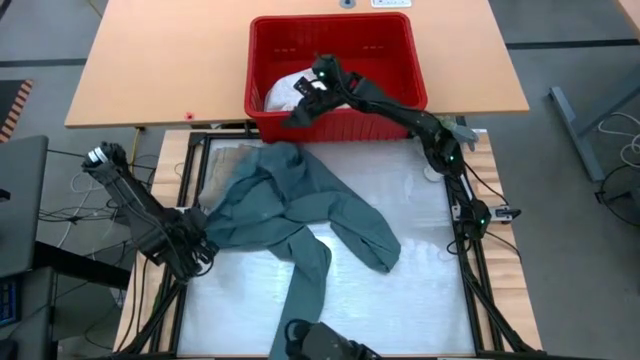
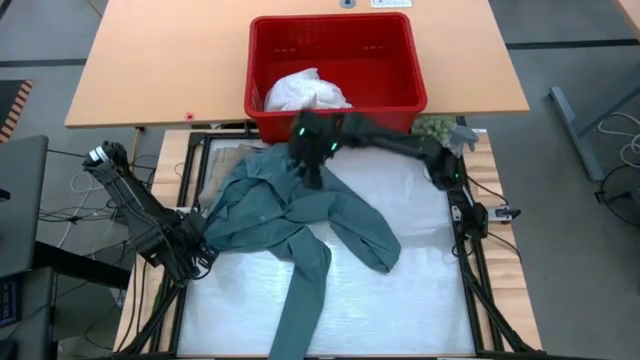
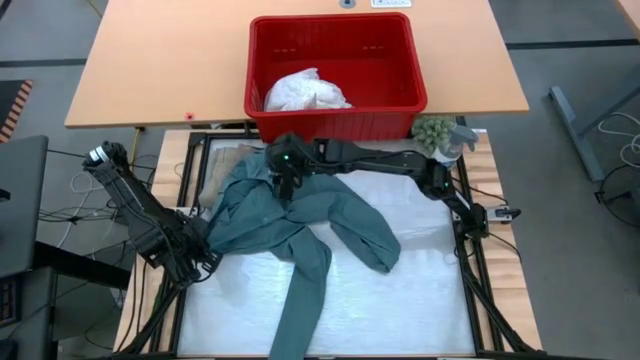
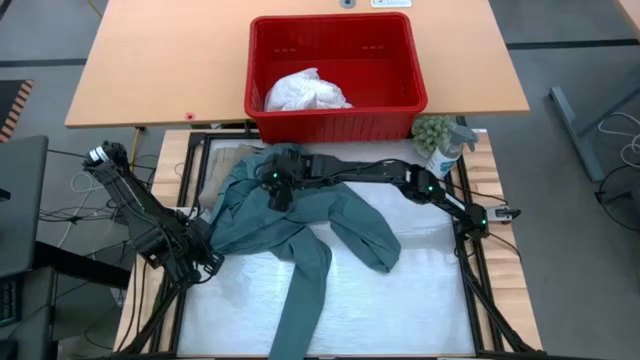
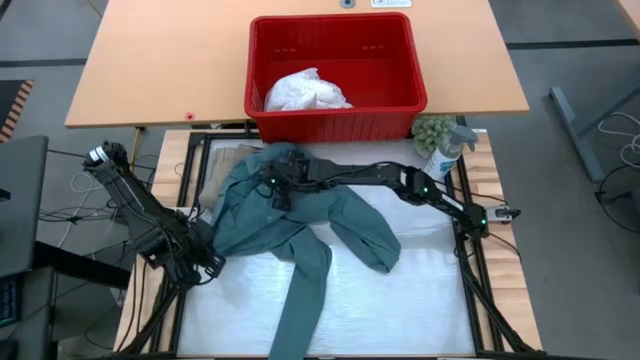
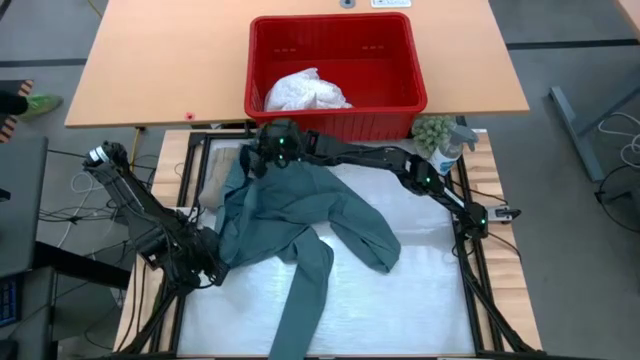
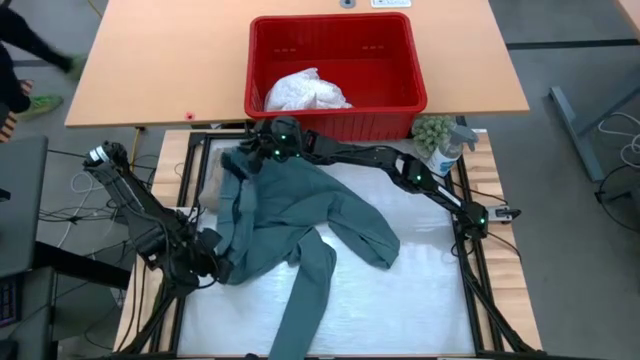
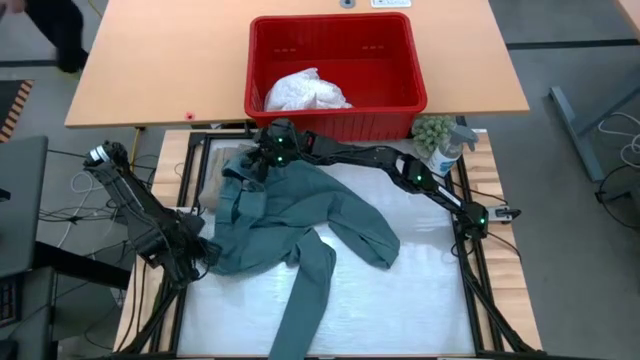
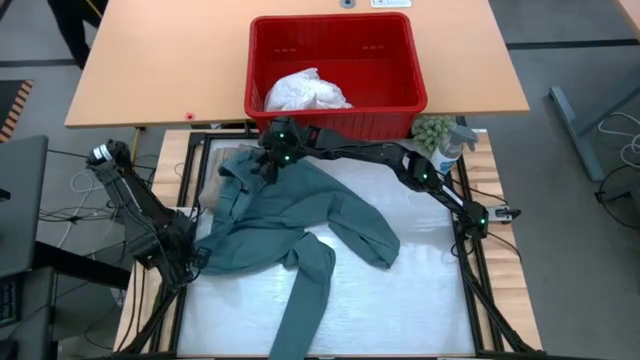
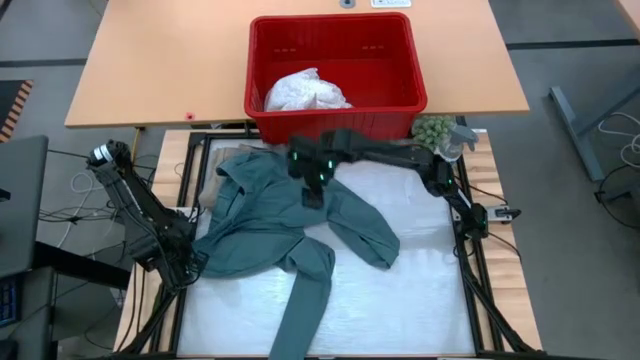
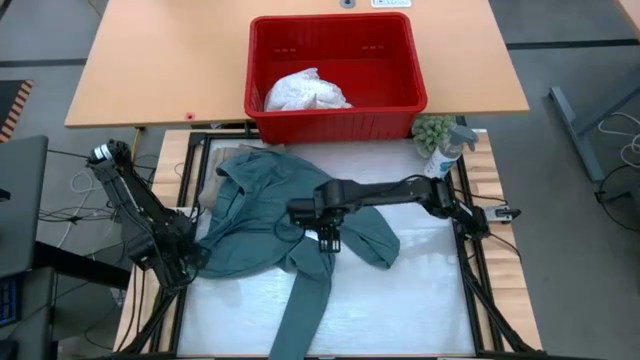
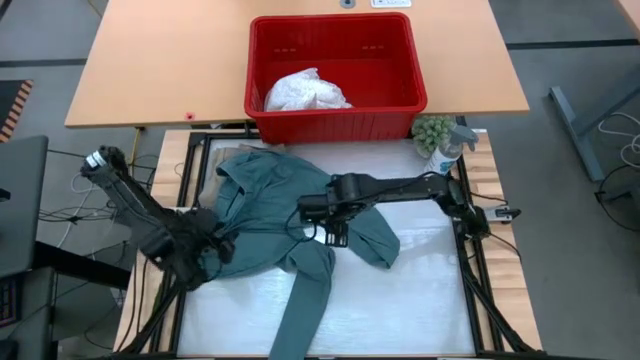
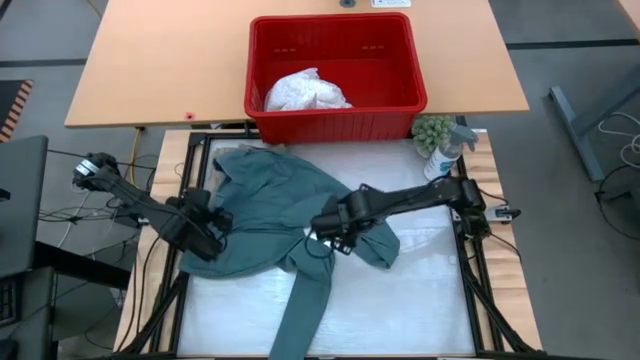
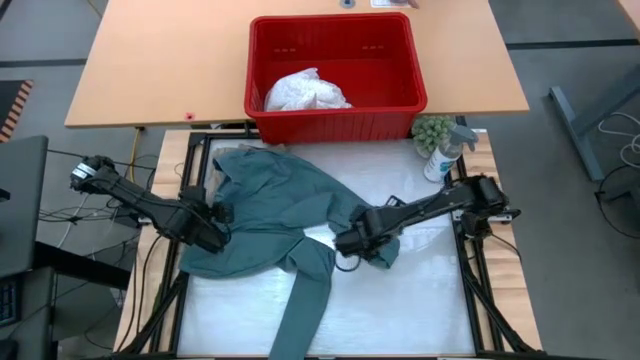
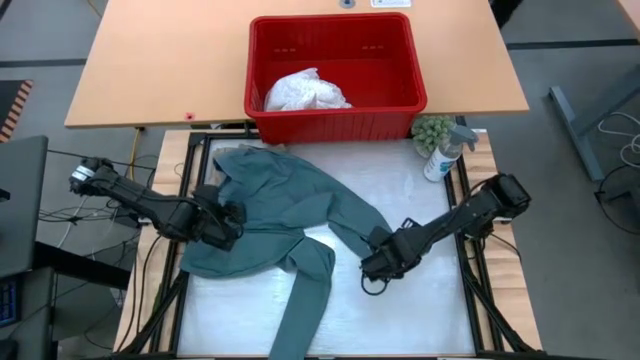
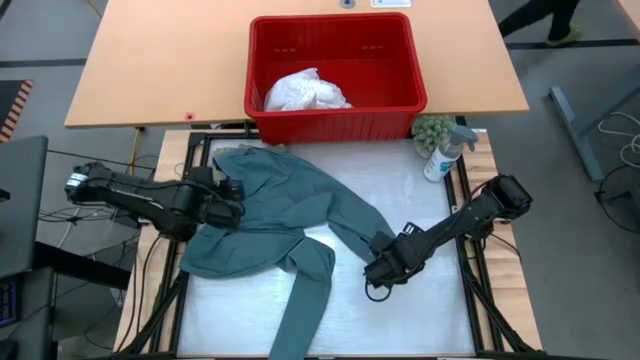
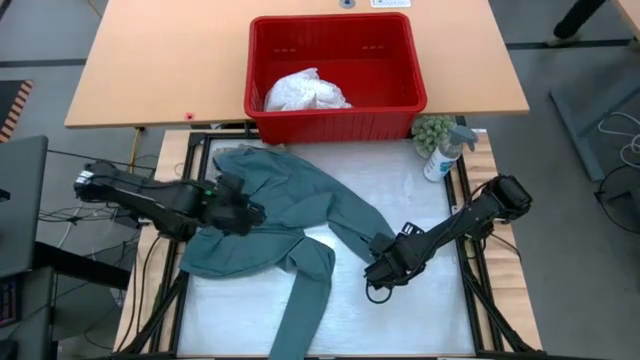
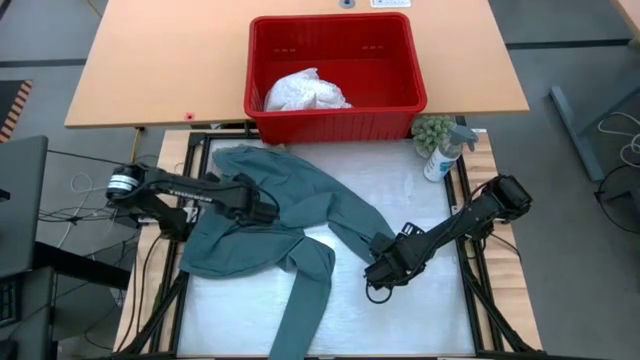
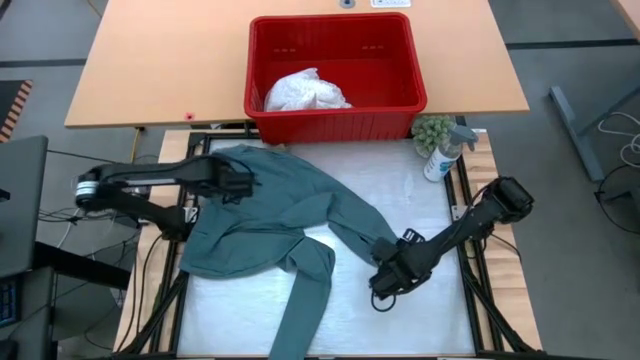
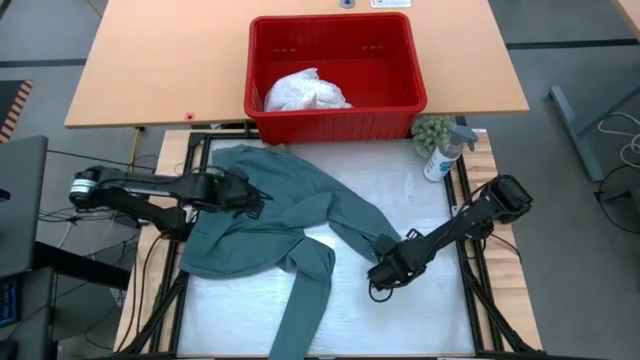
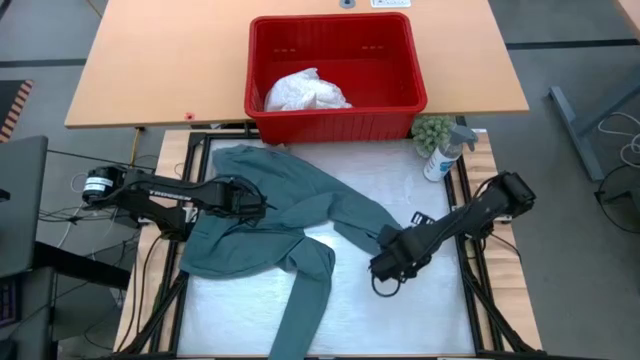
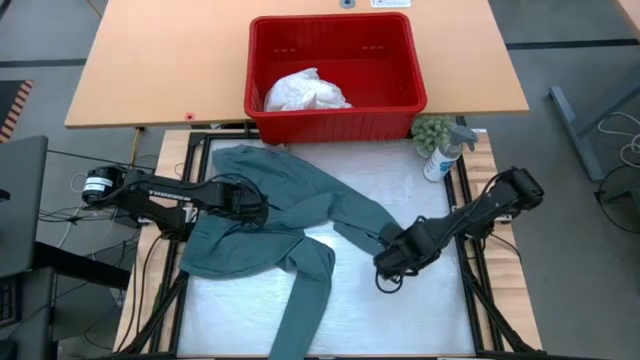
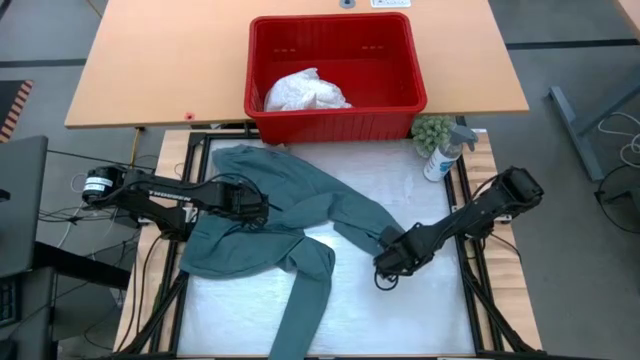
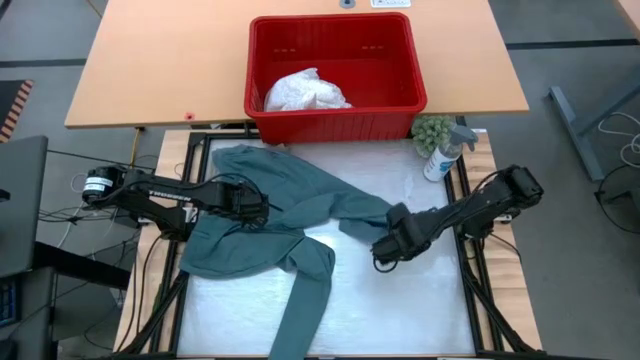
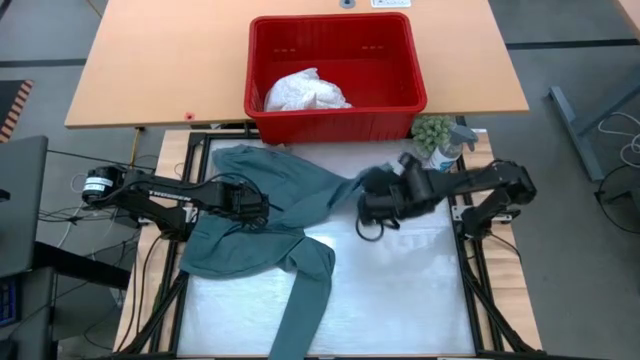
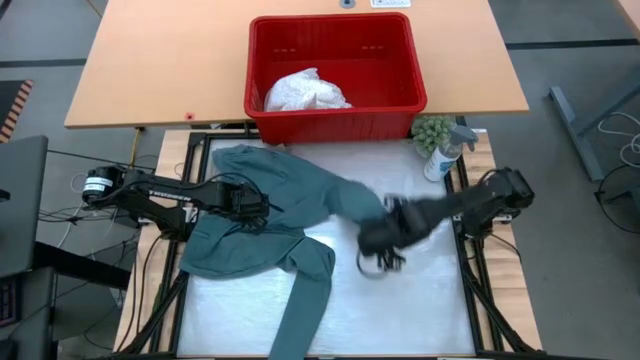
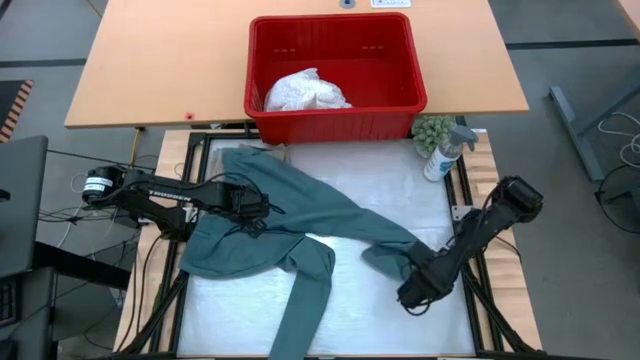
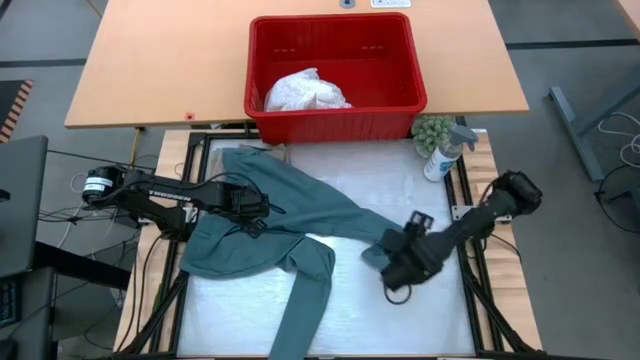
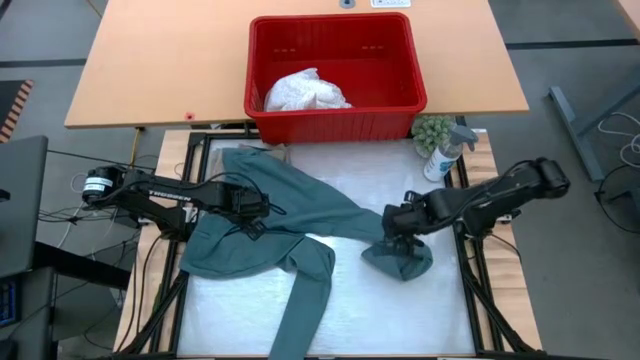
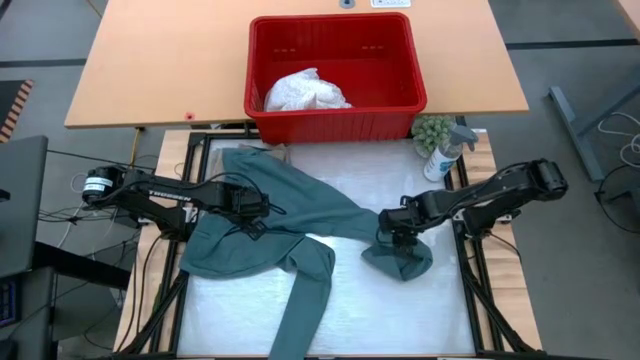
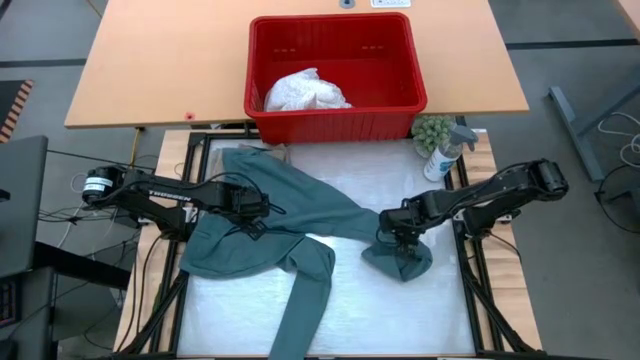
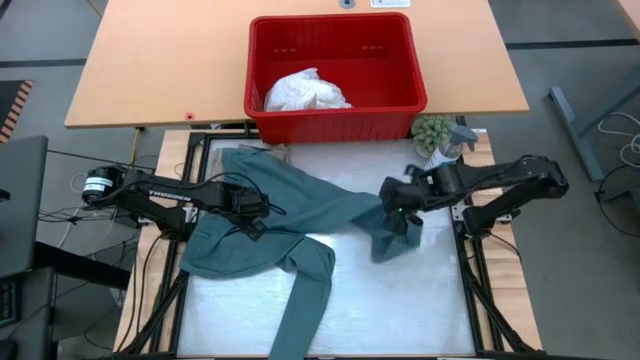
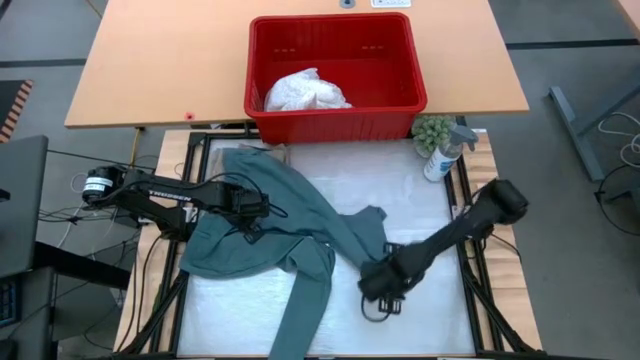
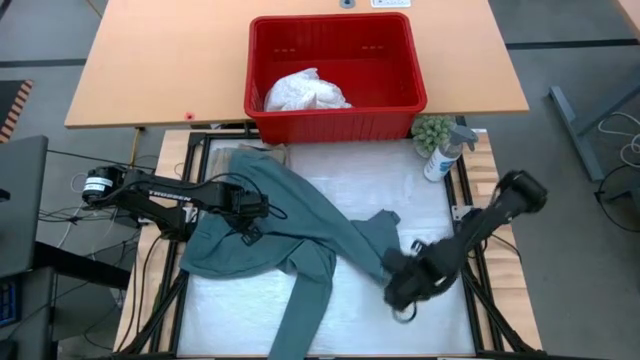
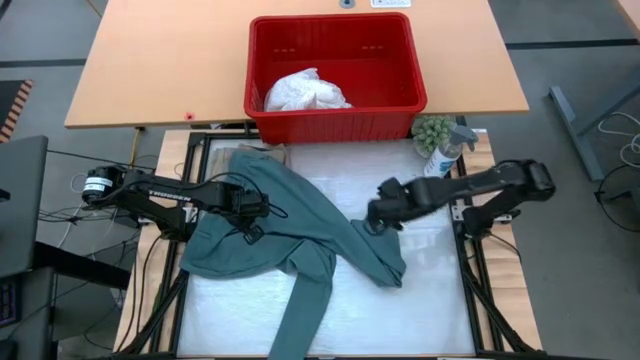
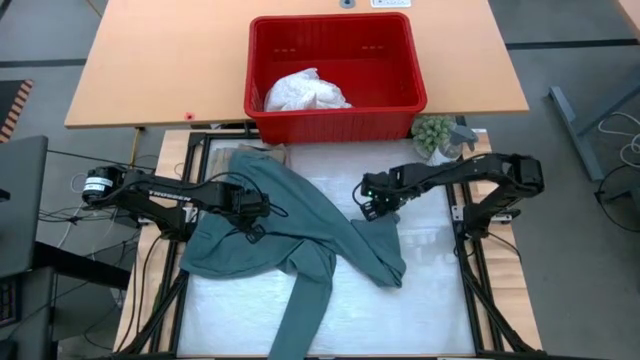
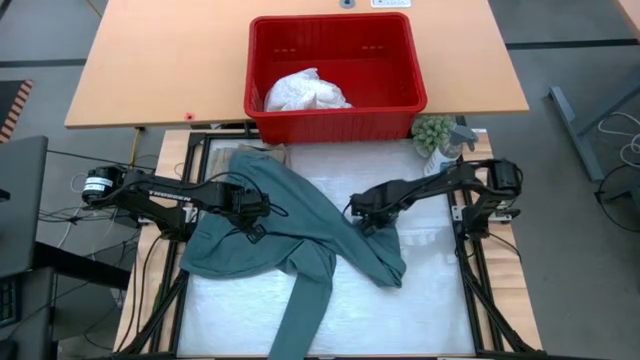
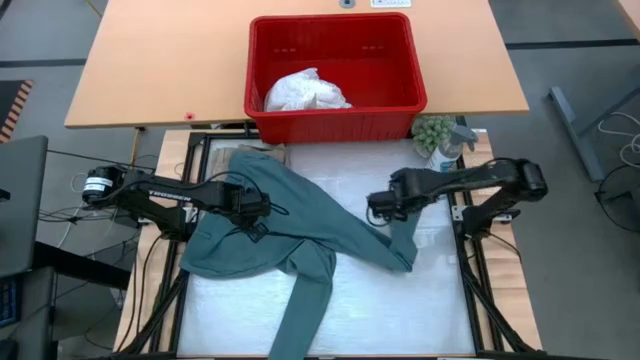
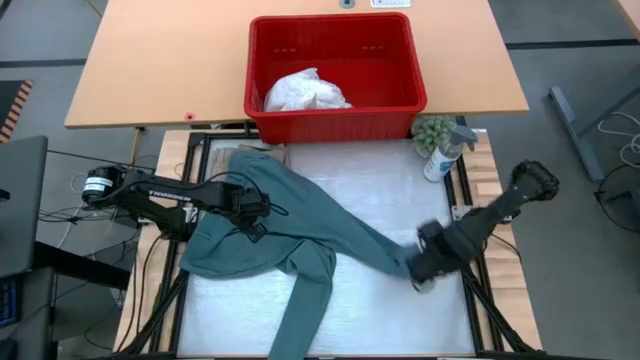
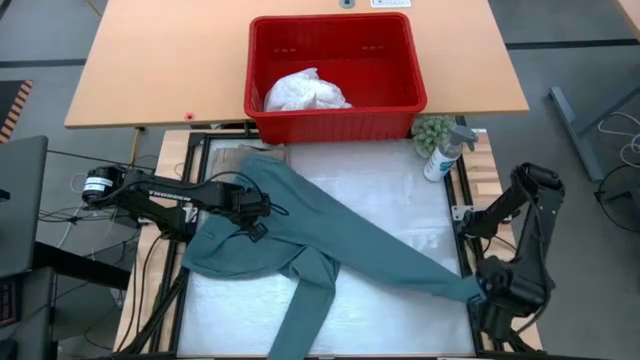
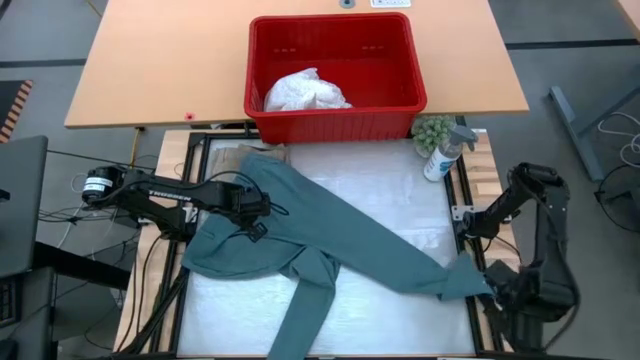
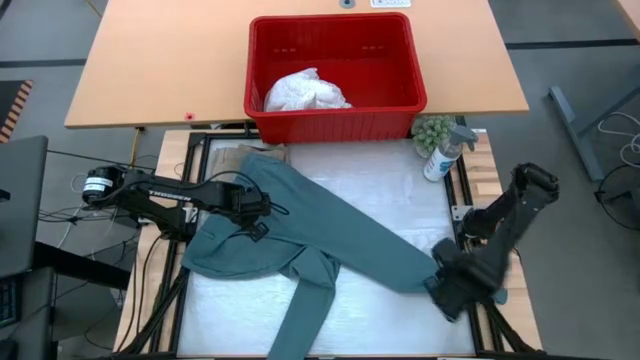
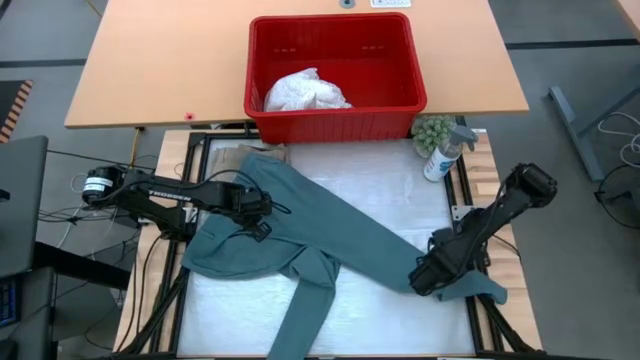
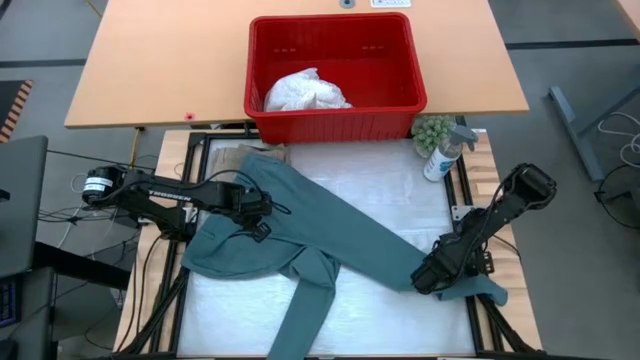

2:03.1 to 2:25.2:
Task: Fold Laundry from Bin
Fold the blue pants in the red bin
